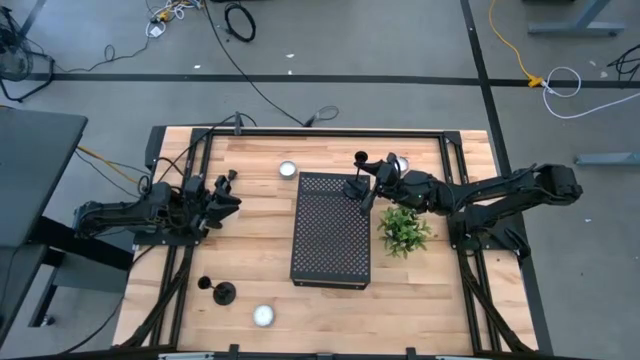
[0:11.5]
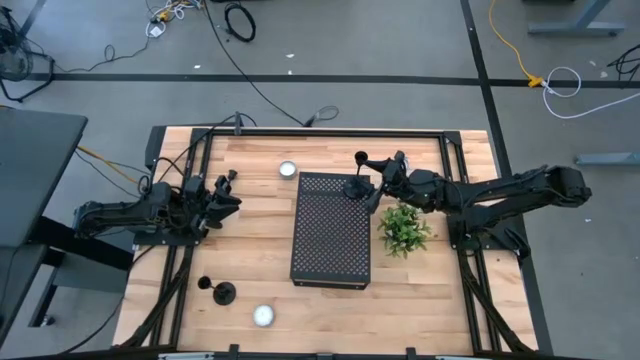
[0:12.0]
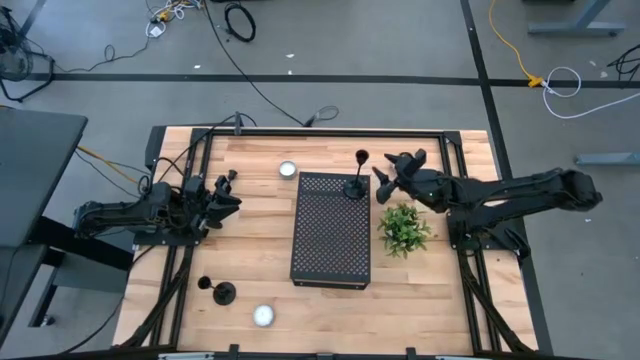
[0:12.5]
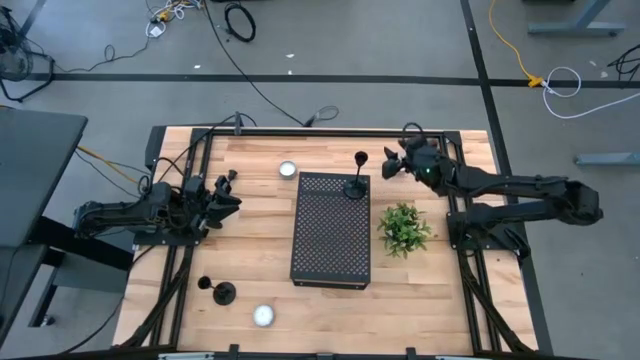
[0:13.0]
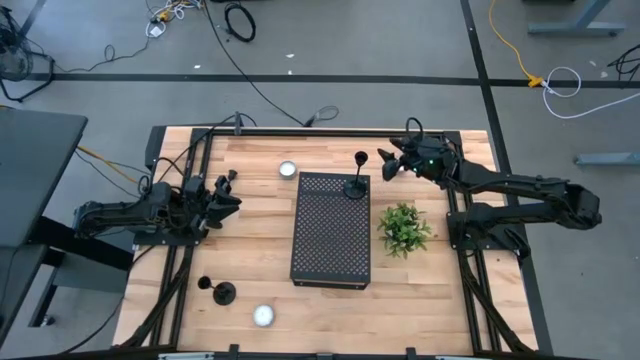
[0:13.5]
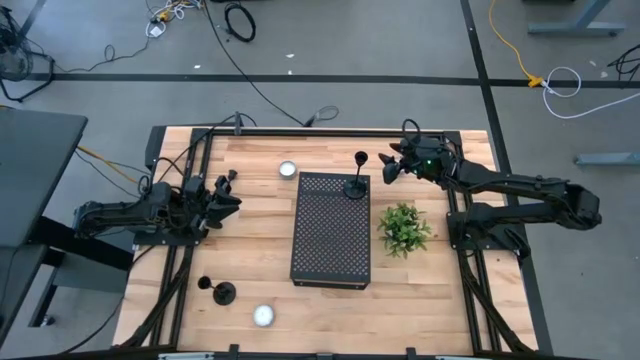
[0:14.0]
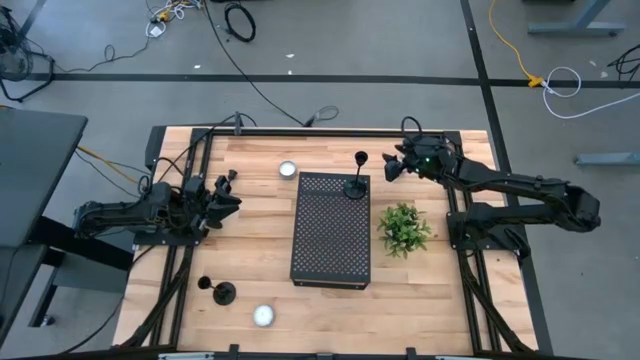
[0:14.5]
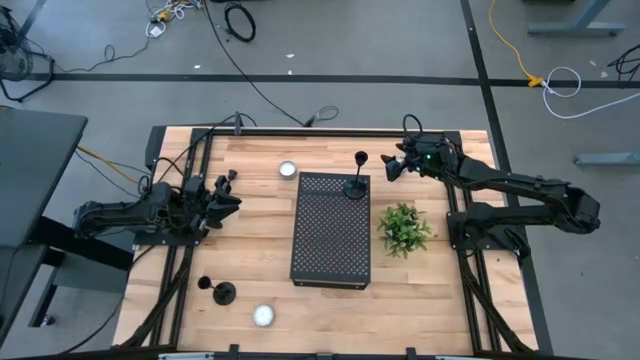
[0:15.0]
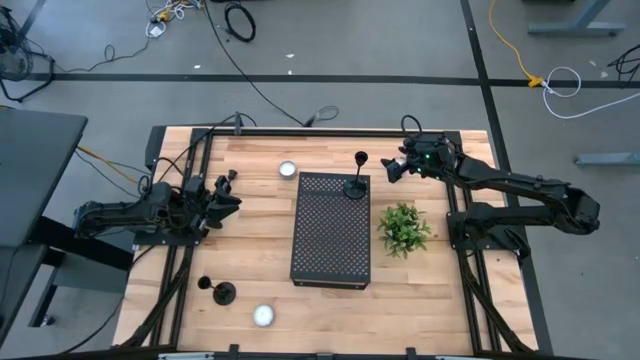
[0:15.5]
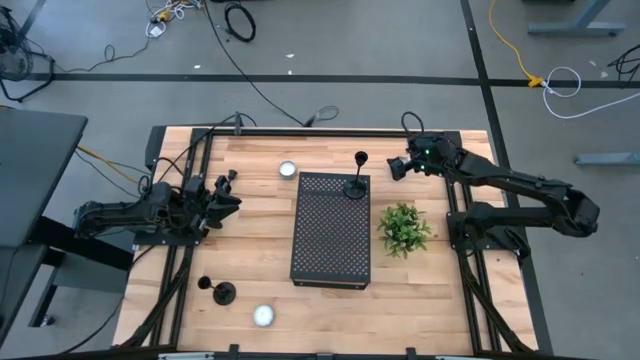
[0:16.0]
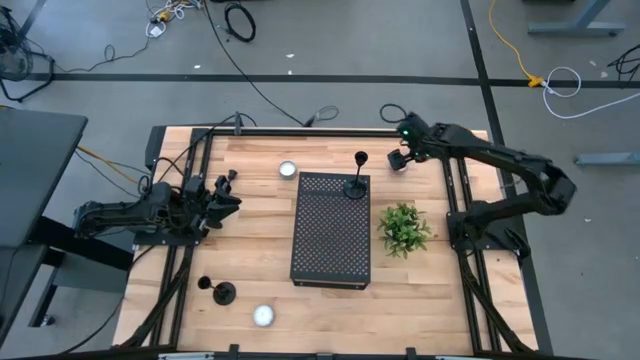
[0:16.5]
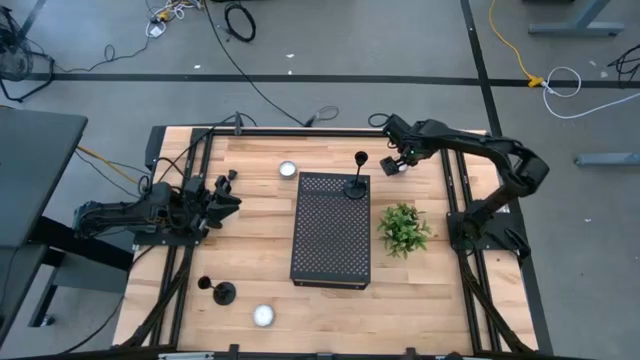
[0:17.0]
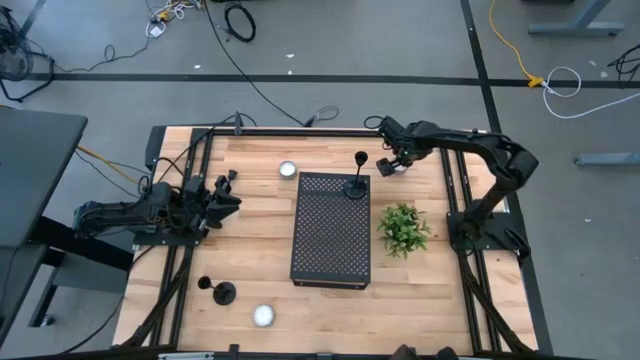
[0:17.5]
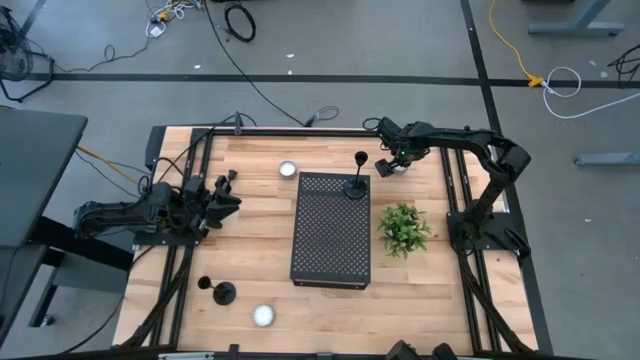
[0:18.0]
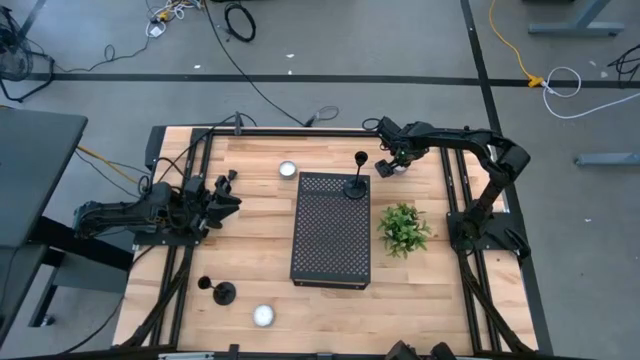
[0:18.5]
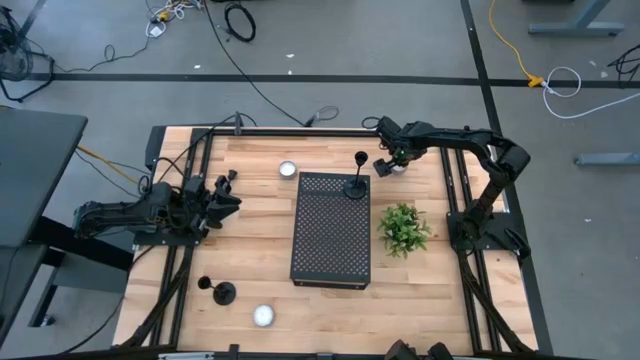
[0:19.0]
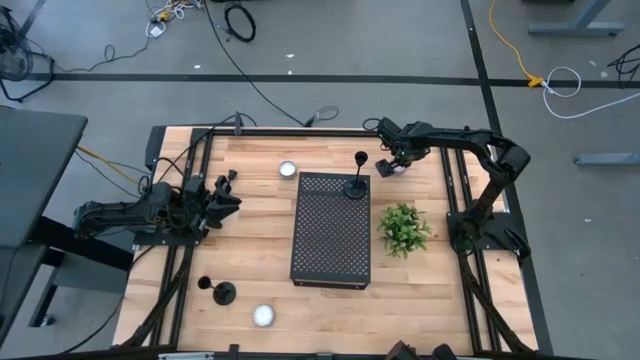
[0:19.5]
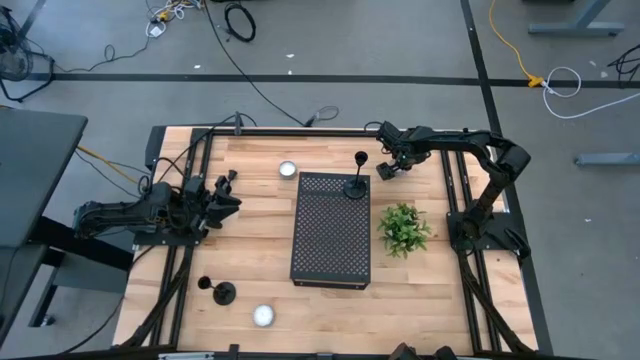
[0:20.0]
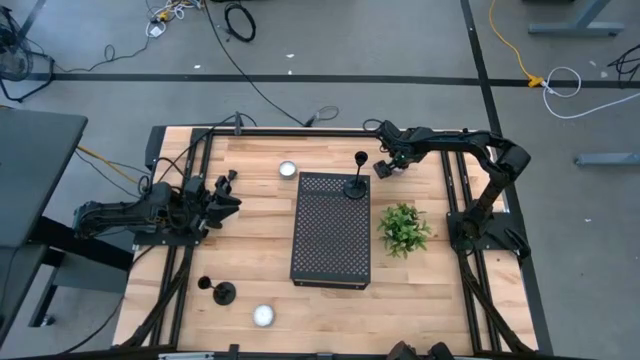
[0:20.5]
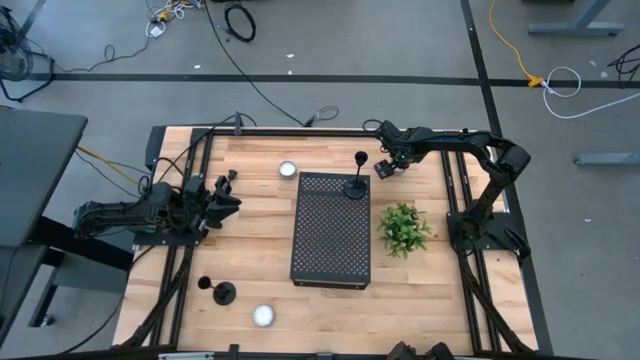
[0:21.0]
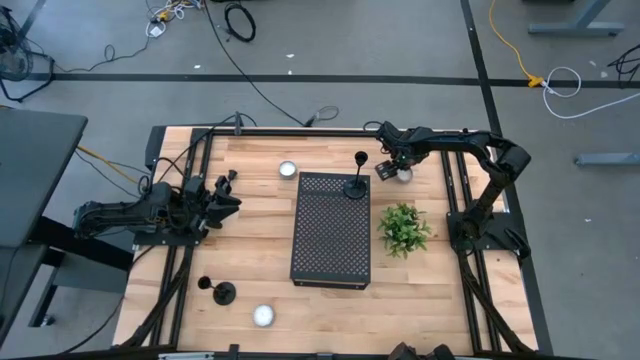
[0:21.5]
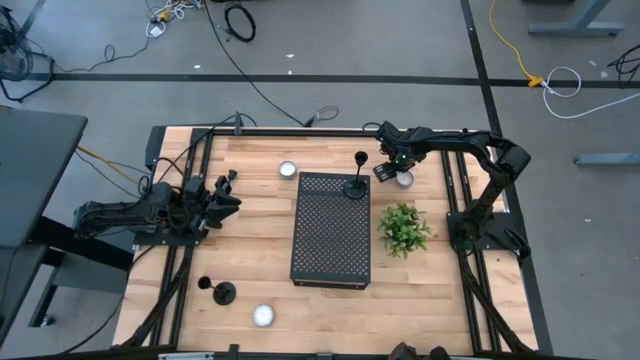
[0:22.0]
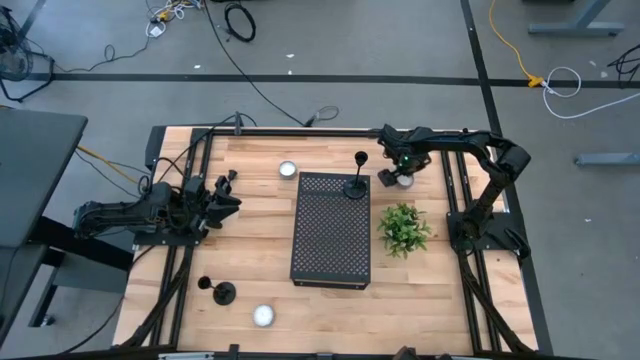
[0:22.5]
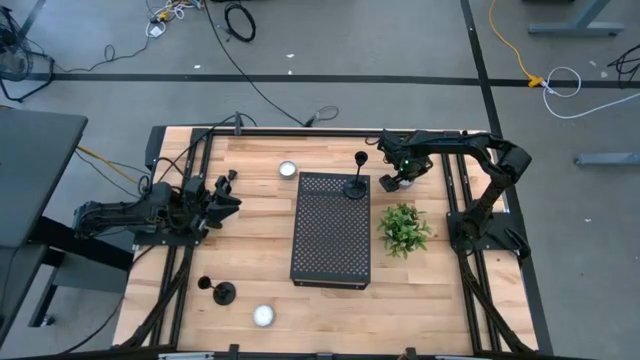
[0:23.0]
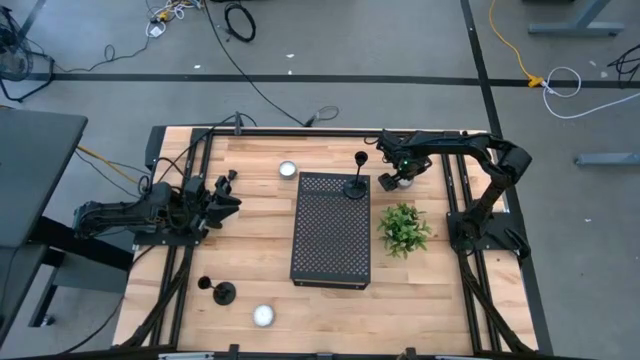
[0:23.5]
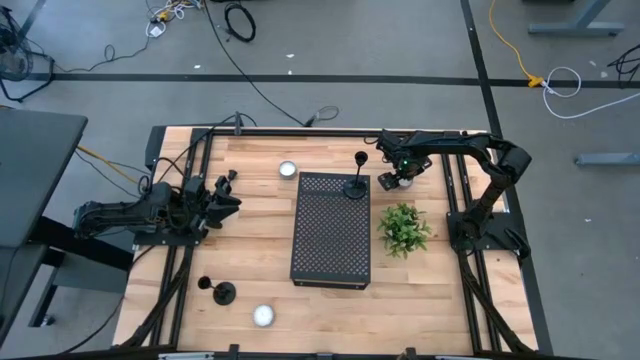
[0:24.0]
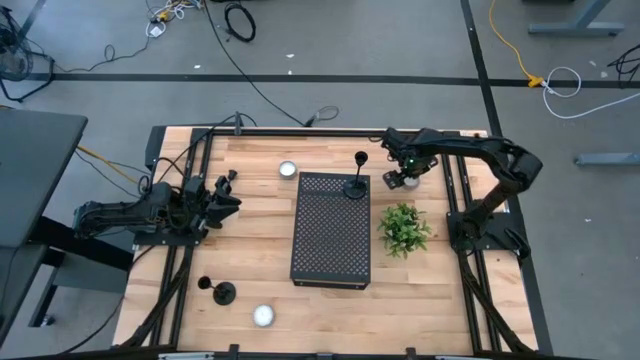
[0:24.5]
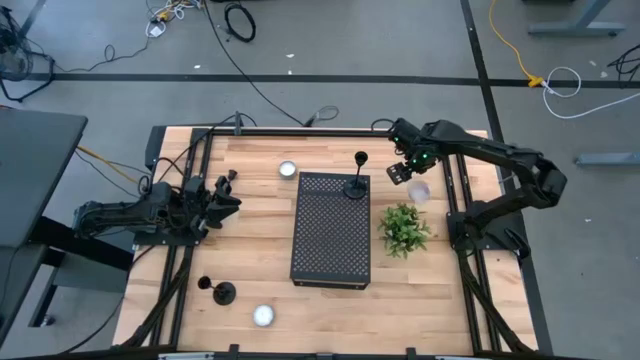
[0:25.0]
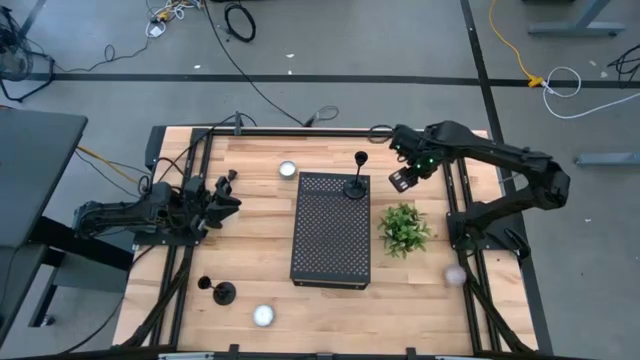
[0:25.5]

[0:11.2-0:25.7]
Task: Pick & Place candle stick holders
Put the right white candle on the shelf

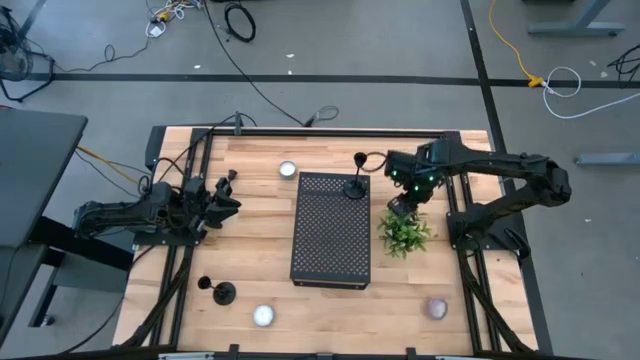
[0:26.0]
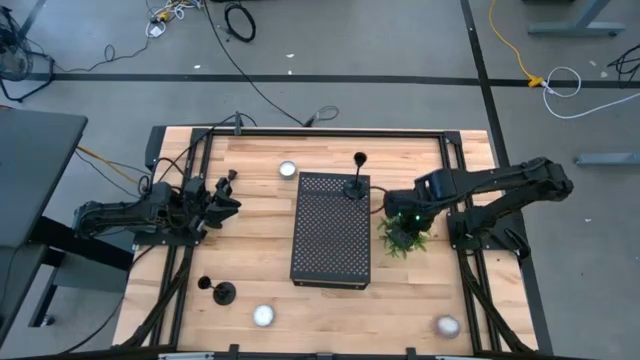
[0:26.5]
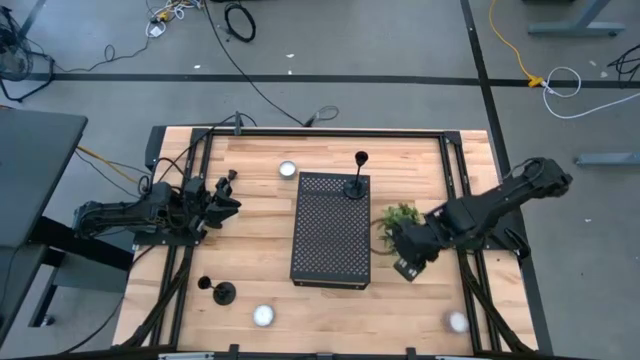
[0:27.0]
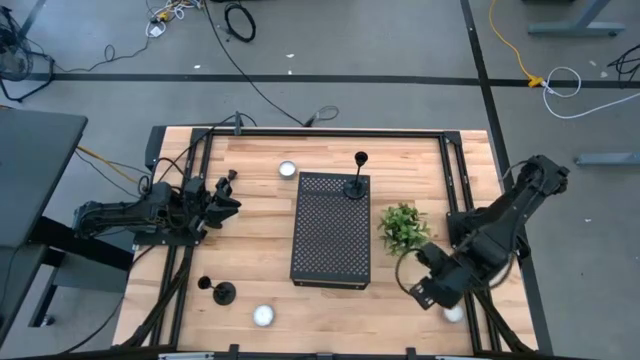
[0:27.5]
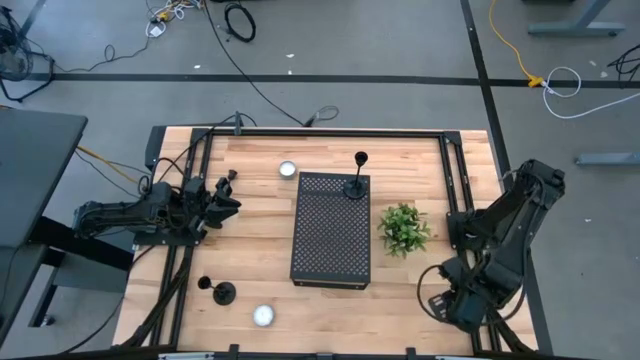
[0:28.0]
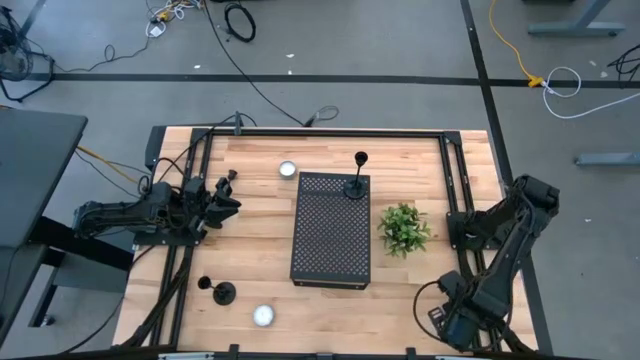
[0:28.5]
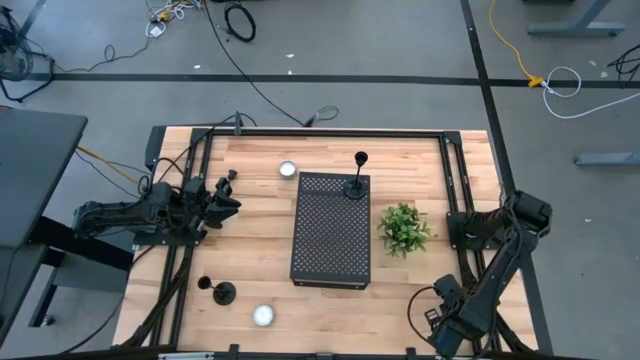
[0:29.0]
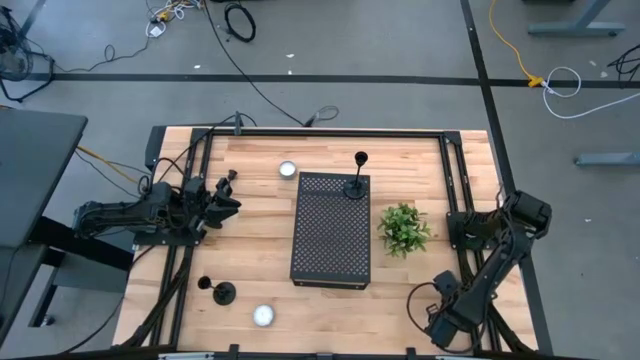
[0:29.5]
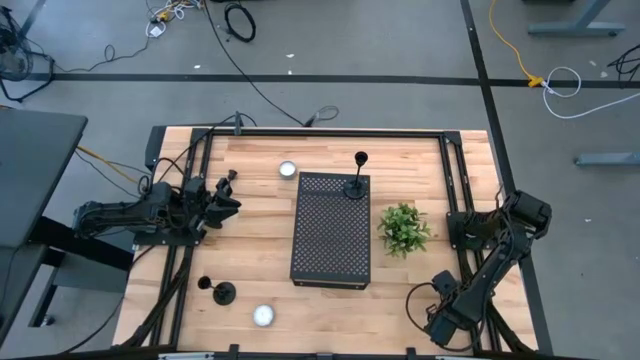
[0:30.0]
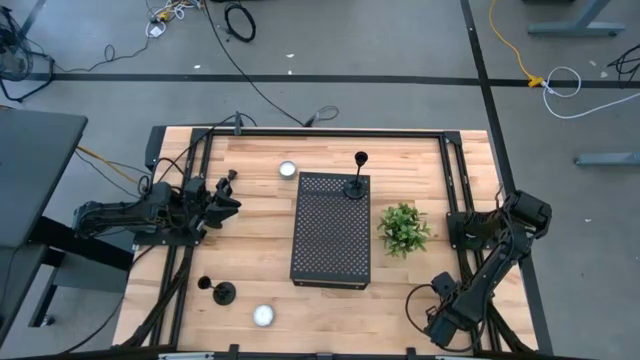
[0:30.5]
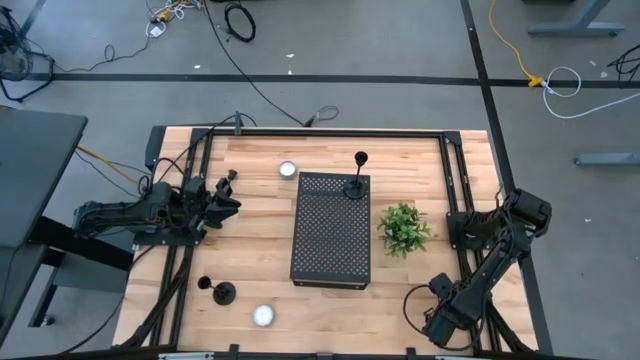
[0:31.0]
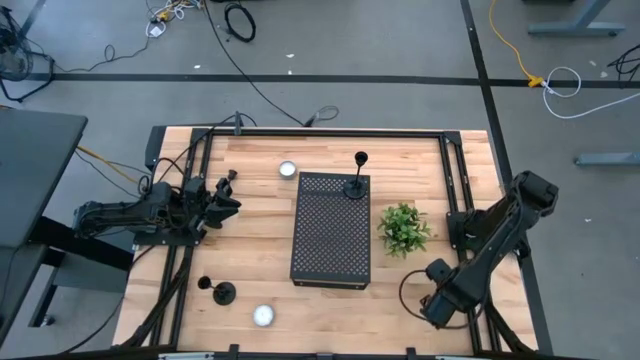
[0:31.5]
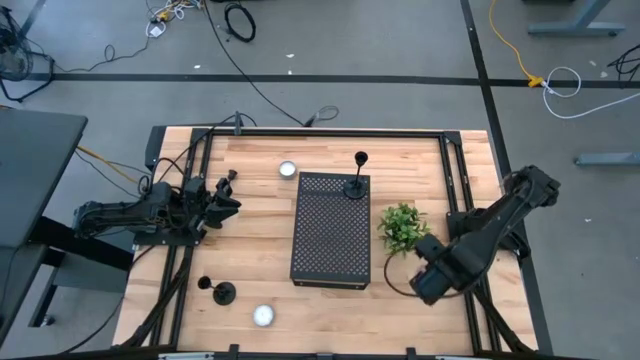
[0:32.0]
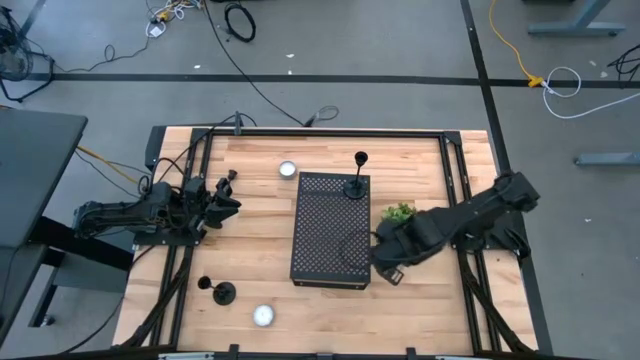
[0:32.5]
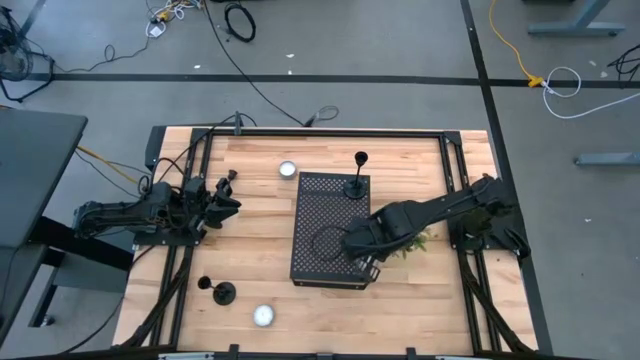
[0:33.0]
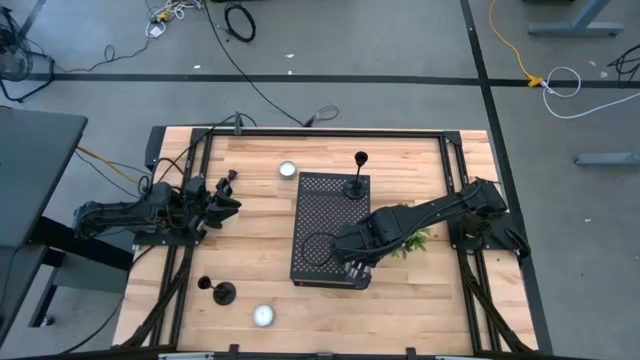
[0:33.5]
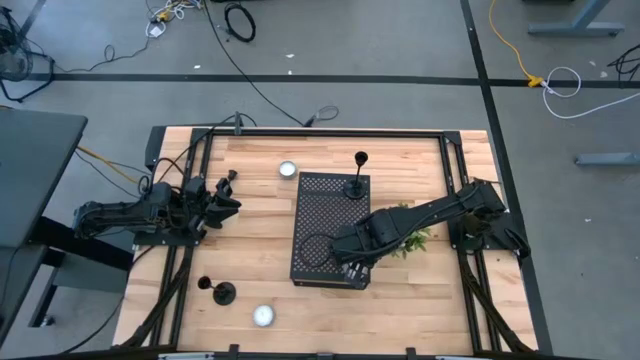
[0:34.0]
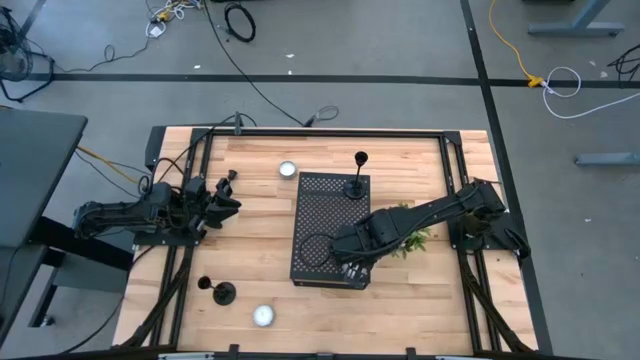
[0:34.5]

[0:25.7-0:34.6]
Put the right white candle on the shelf
